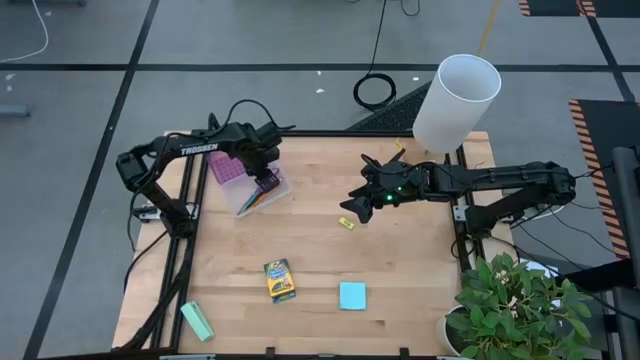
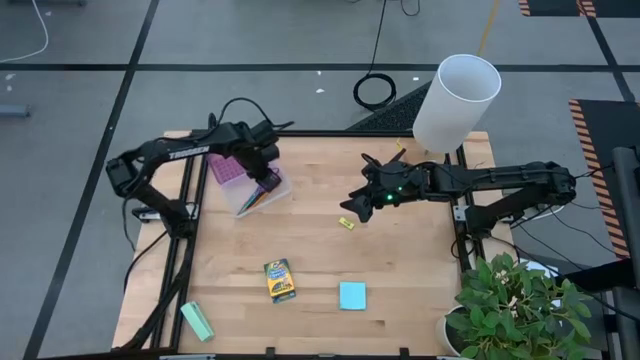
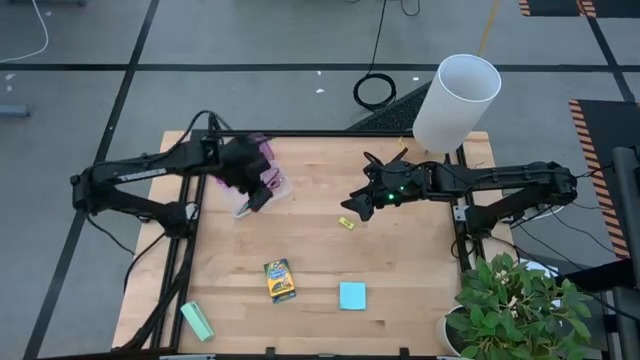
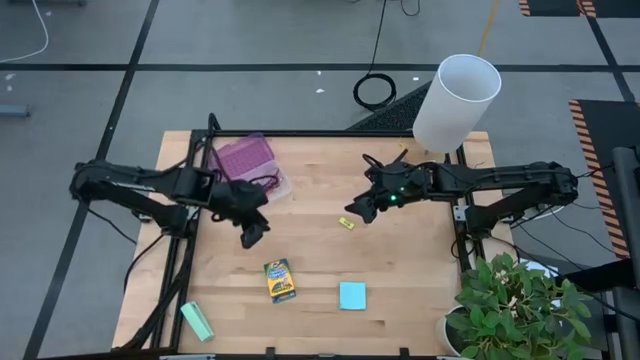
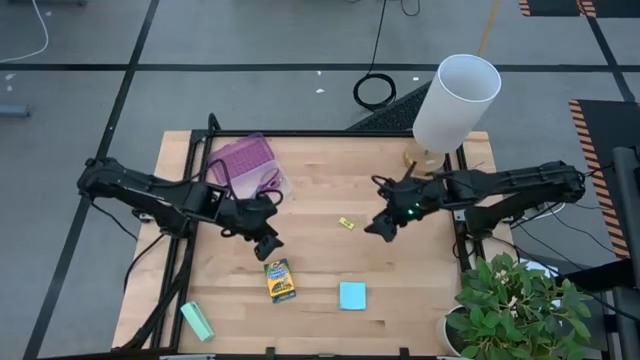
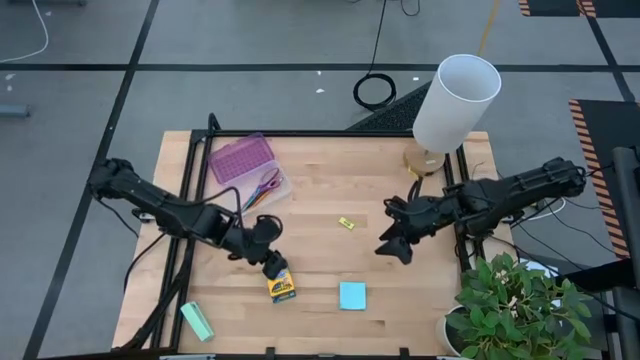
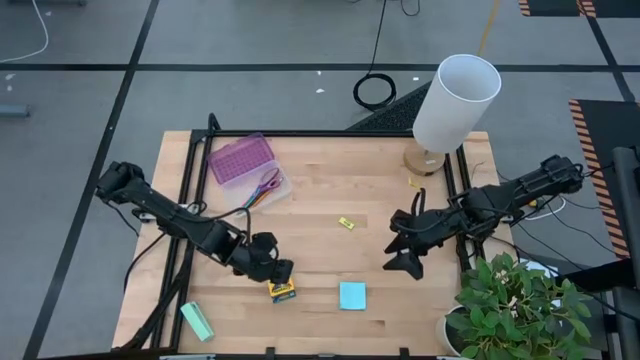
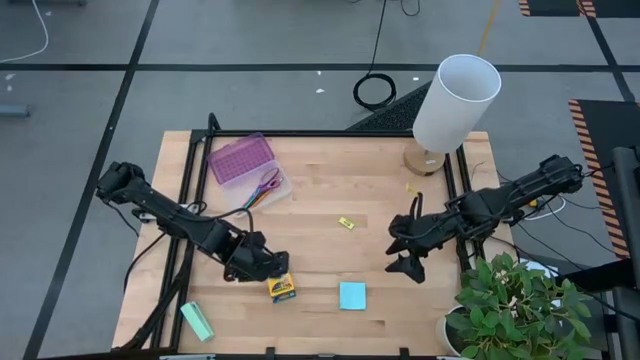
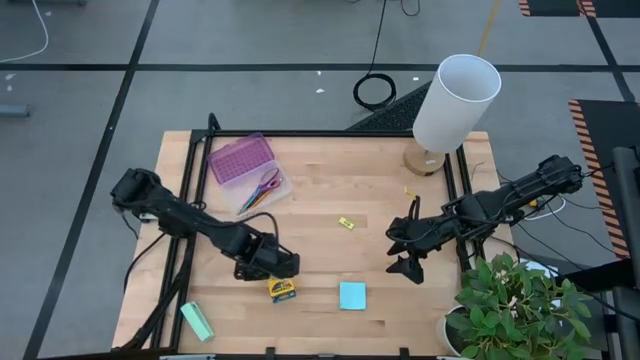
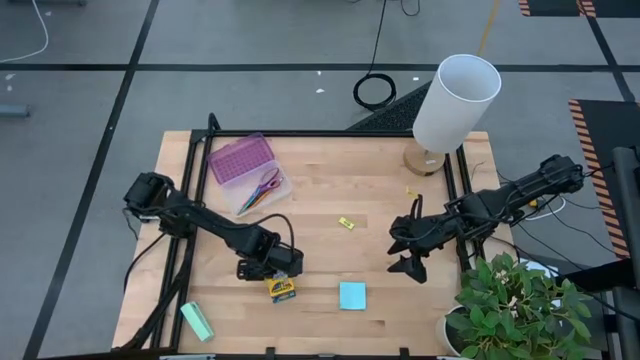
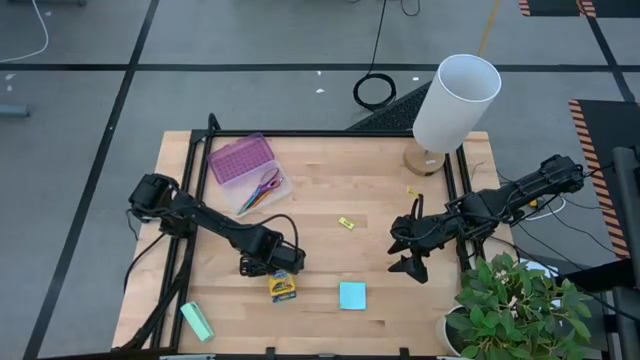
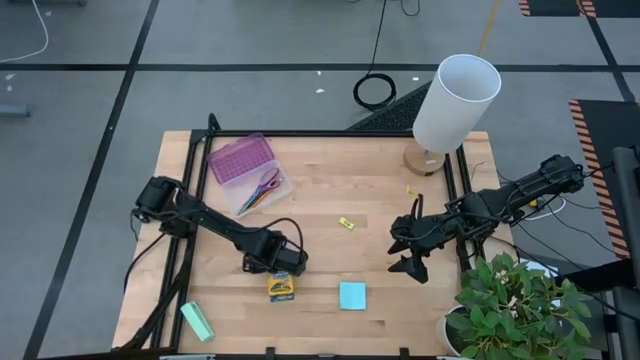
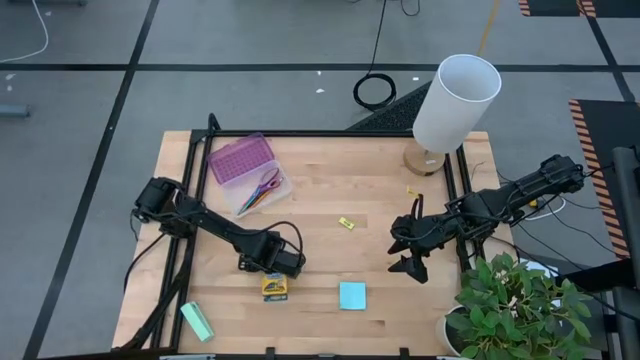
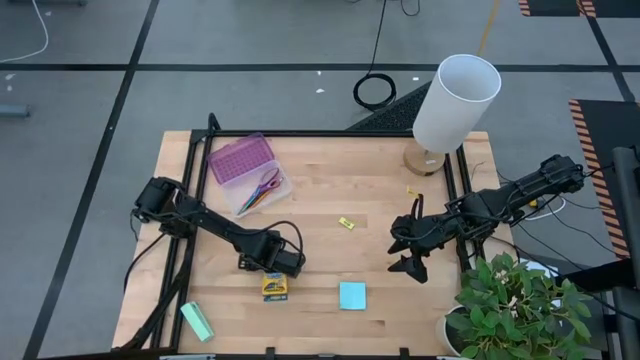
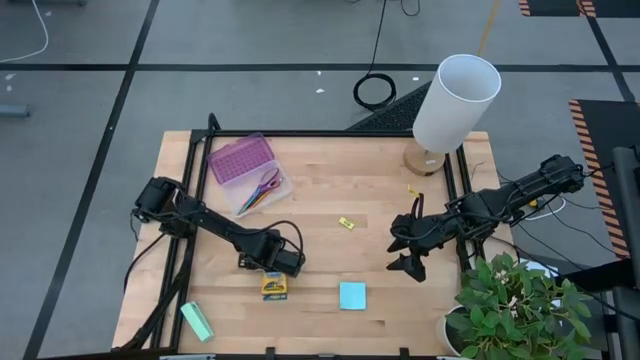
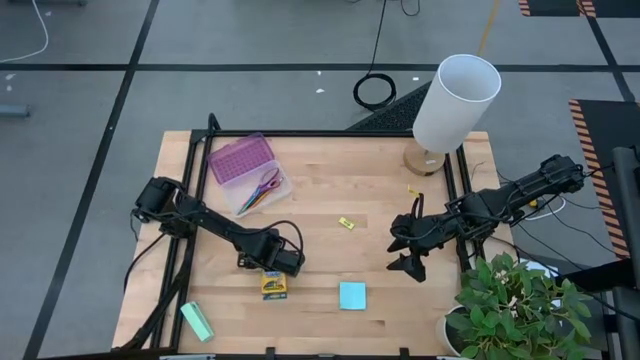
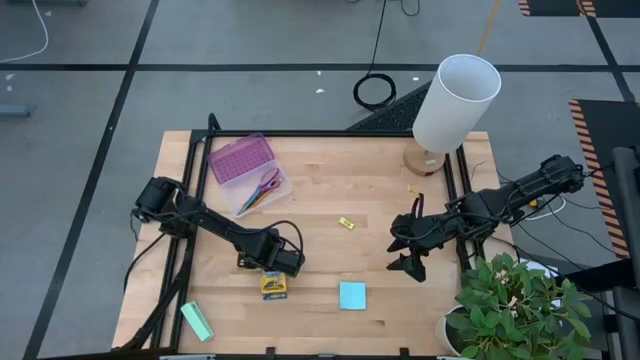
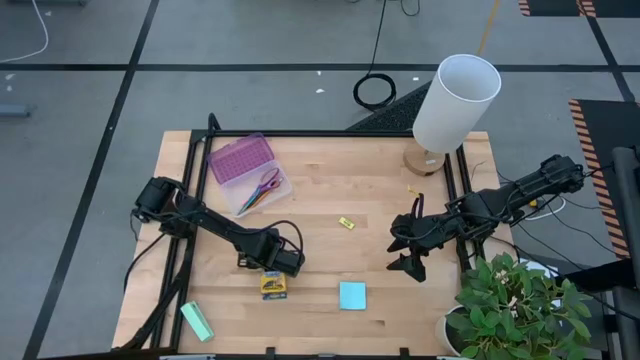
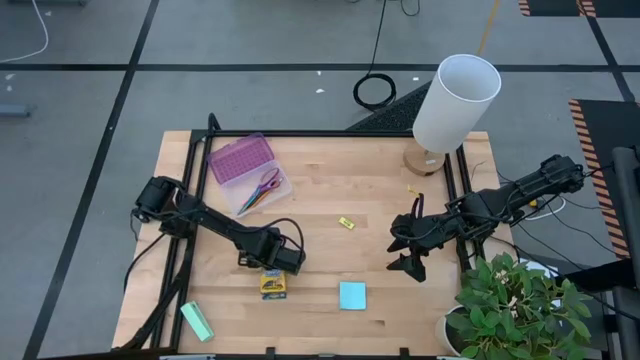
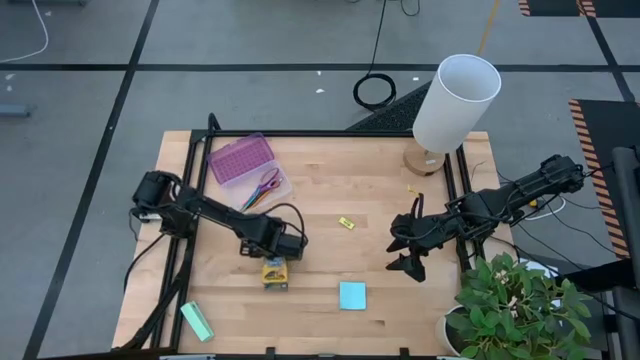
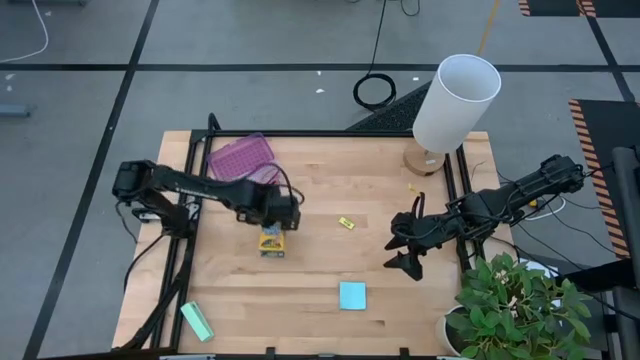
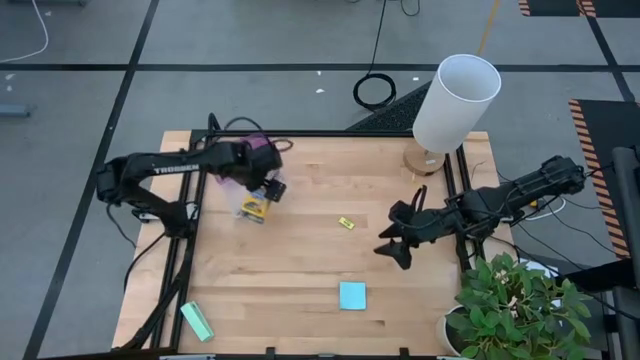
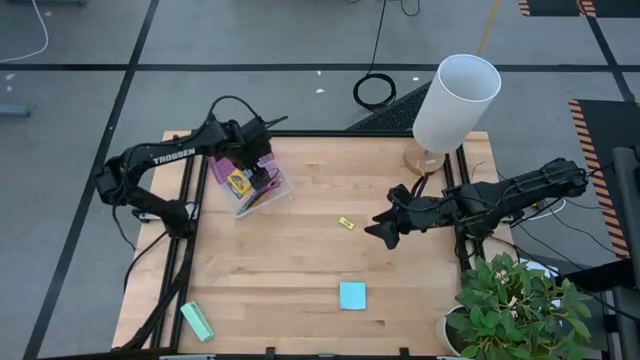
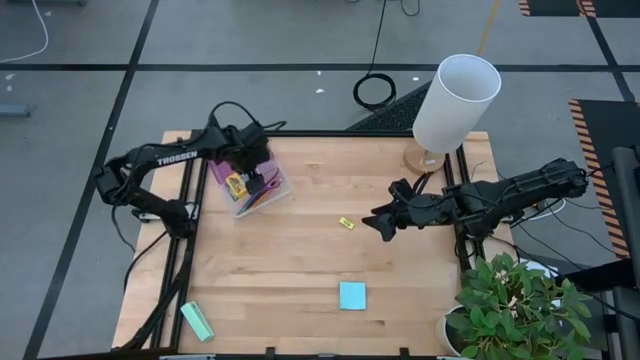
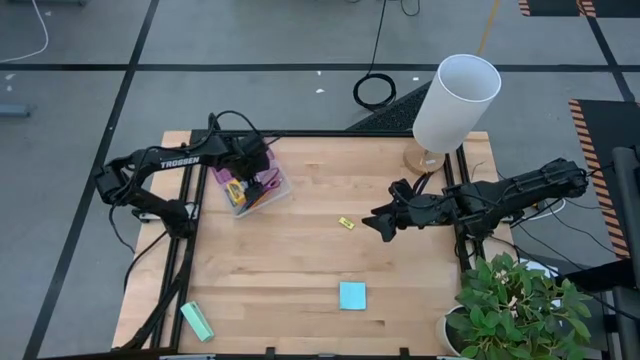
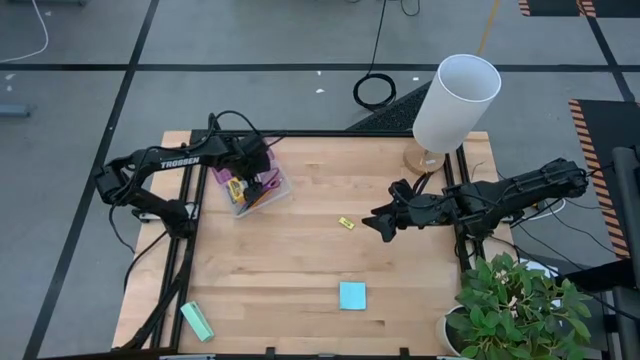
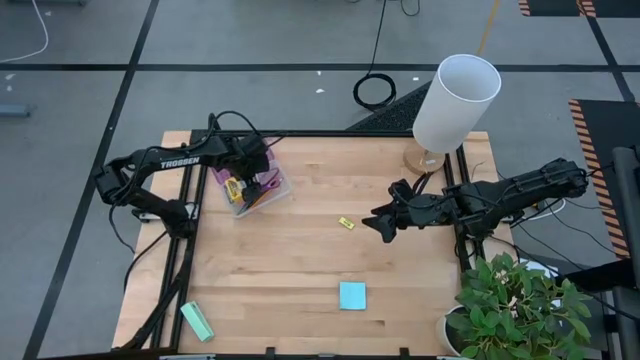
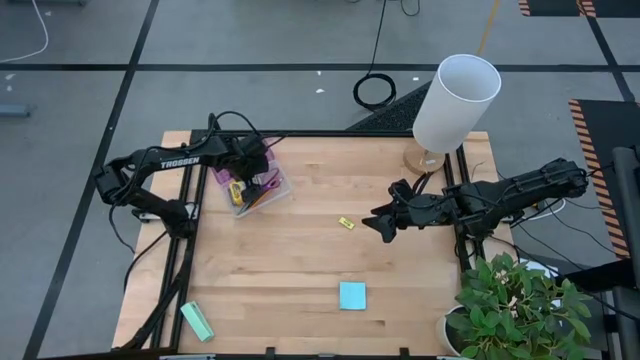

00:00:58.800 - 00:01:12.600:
Task: Pack school essentials
Put the crayon box into the supply box

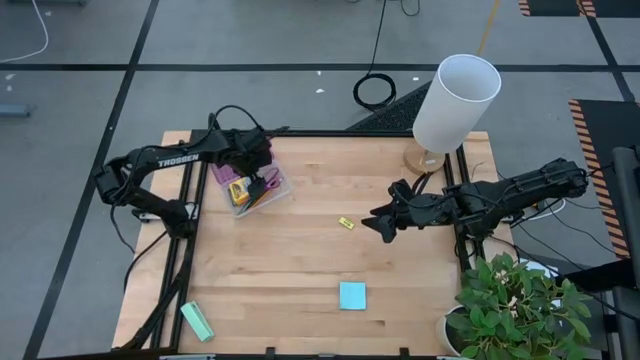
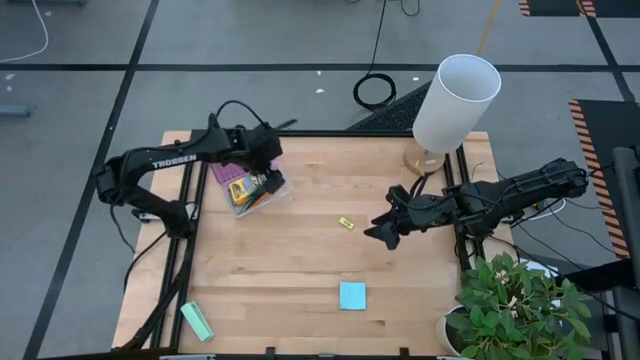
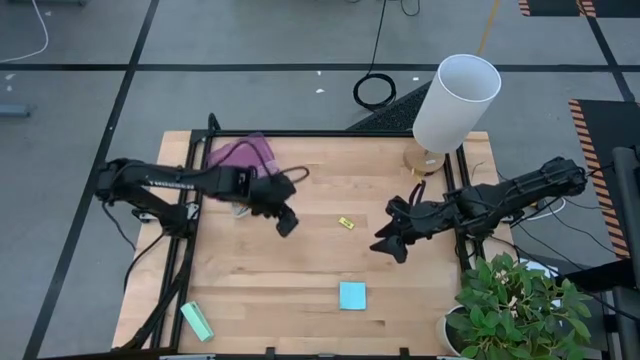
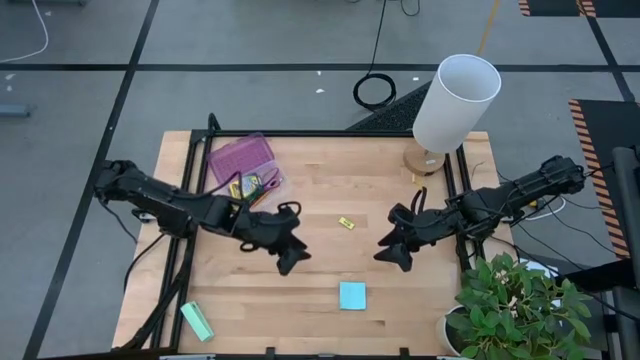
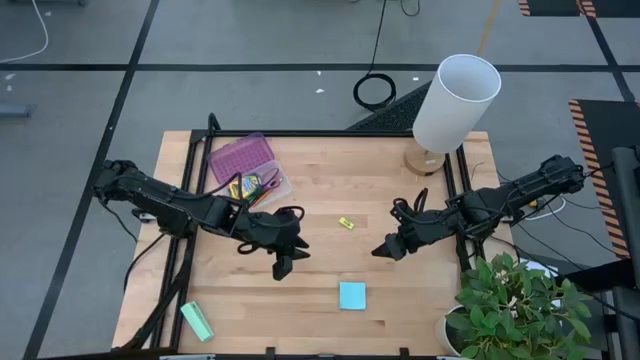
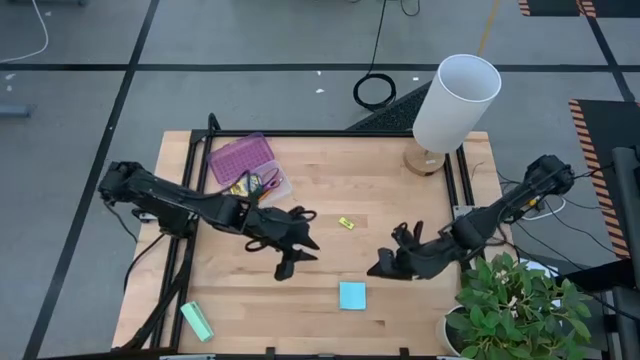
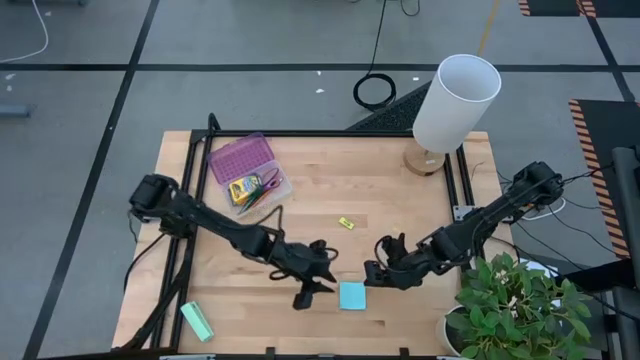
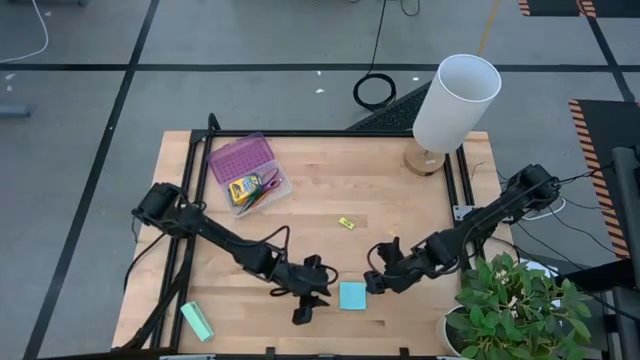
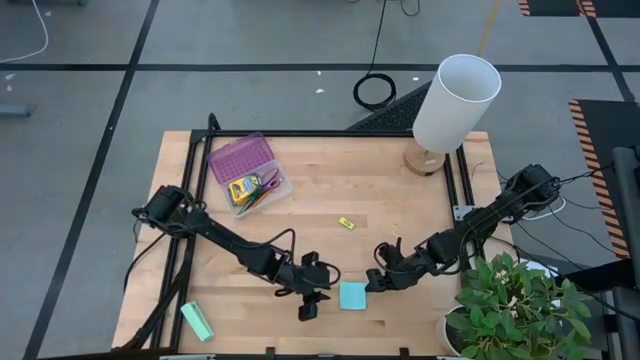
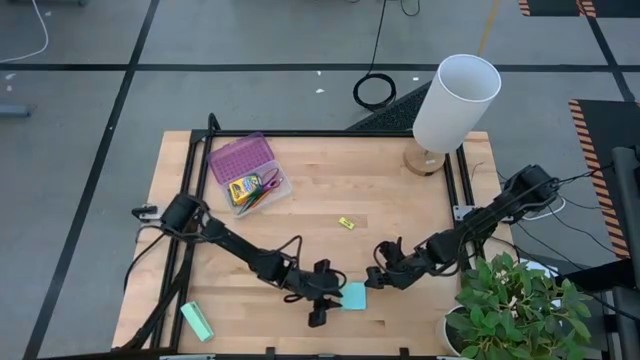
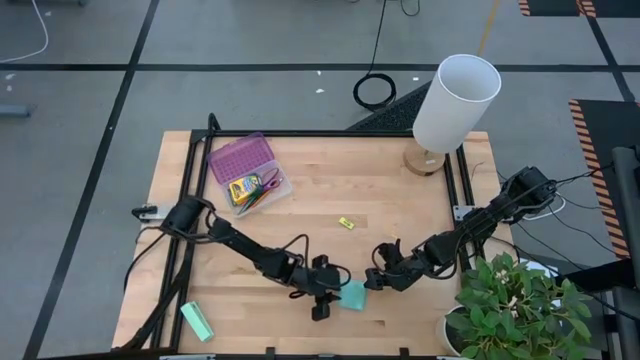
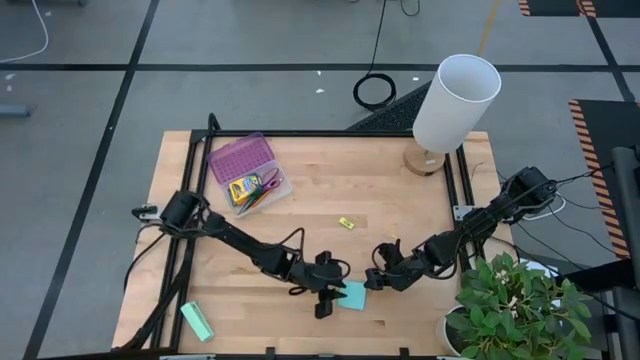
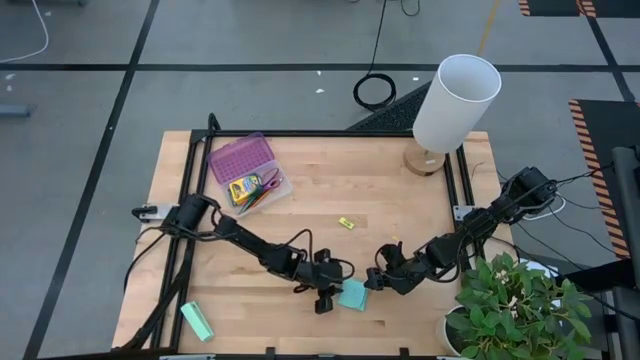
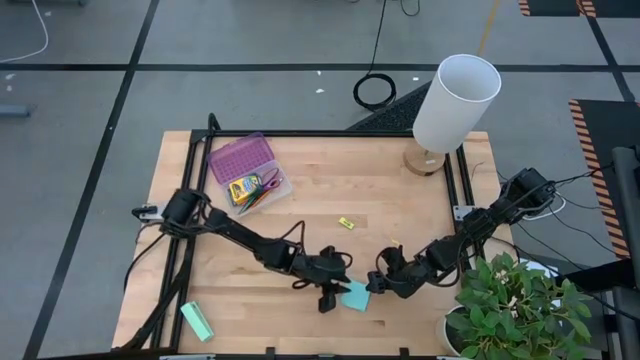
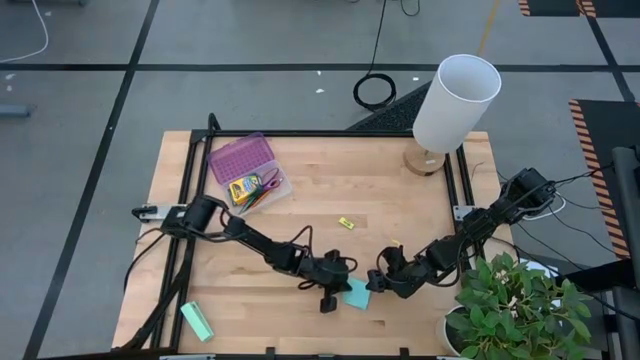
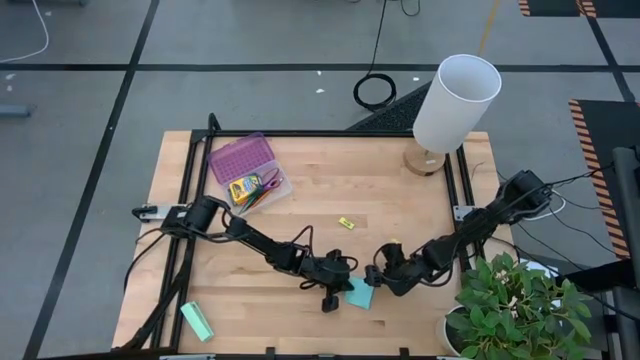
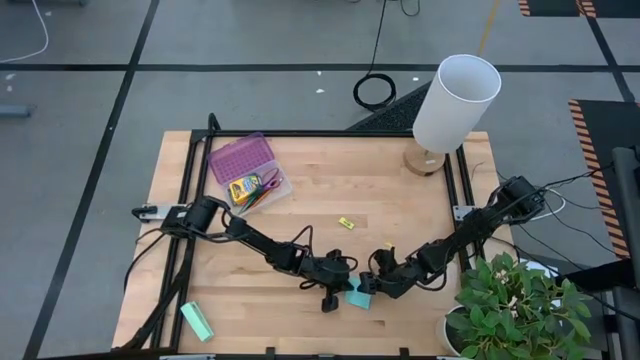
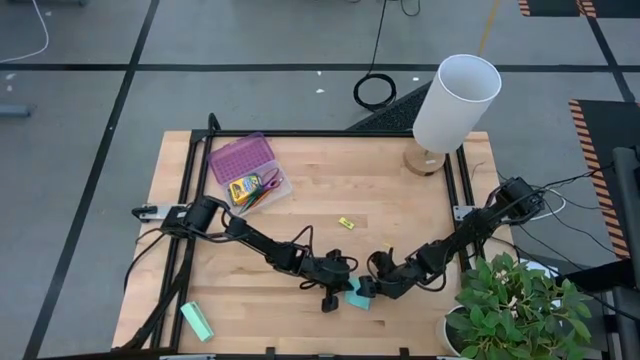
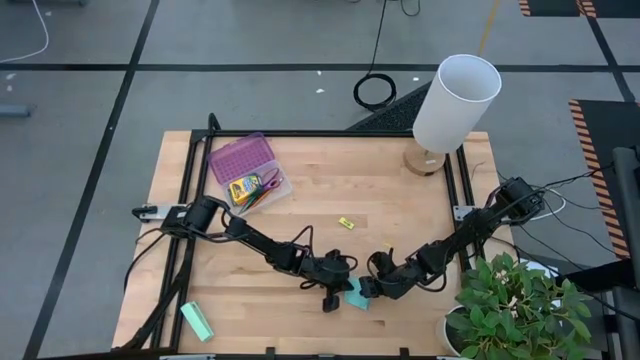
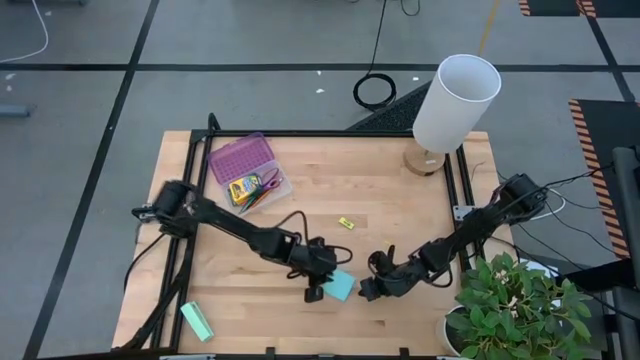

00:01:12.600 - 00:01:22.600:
Put the blue sticky notes into the supply box
